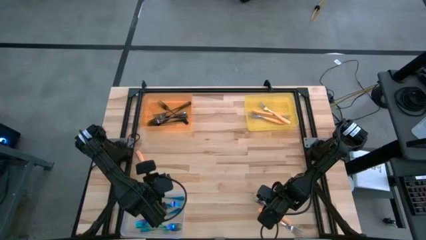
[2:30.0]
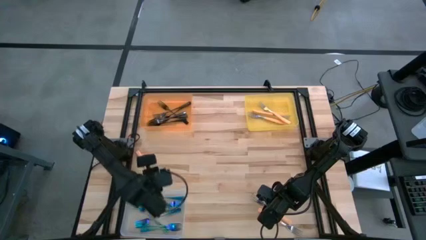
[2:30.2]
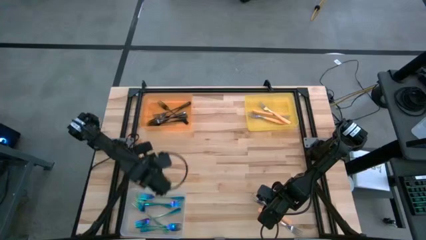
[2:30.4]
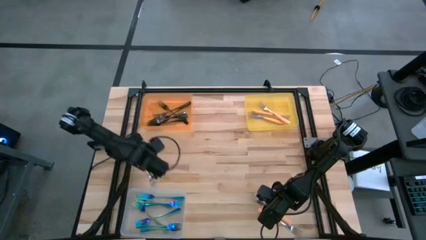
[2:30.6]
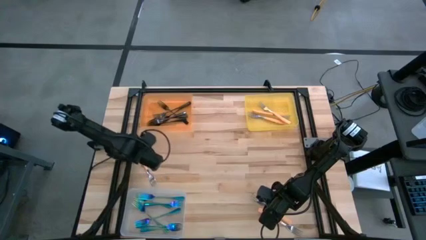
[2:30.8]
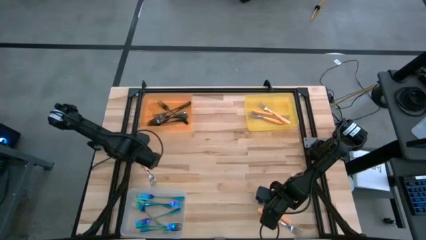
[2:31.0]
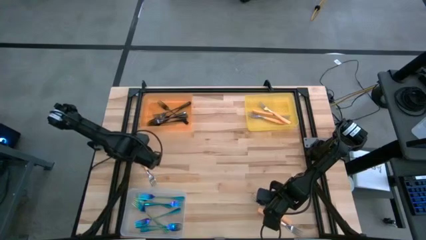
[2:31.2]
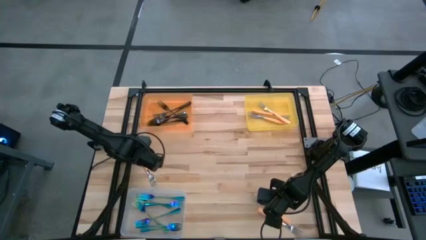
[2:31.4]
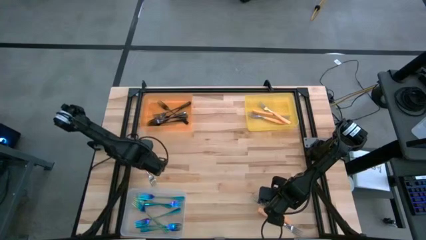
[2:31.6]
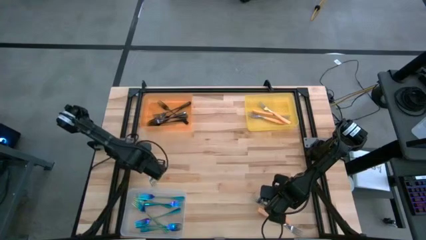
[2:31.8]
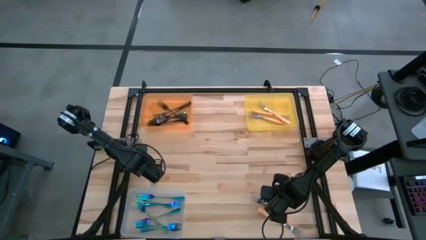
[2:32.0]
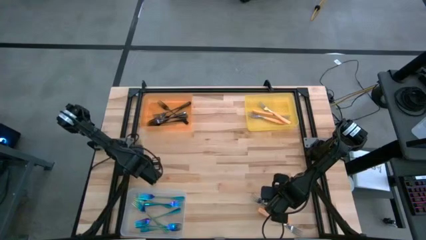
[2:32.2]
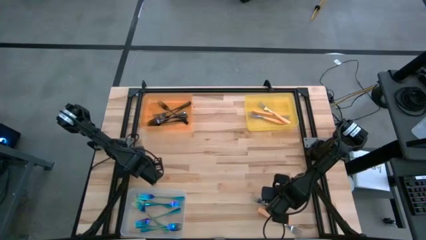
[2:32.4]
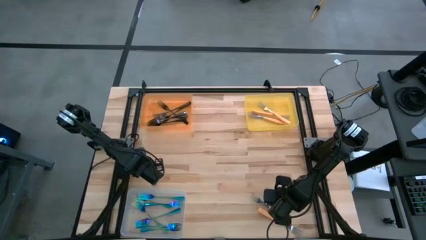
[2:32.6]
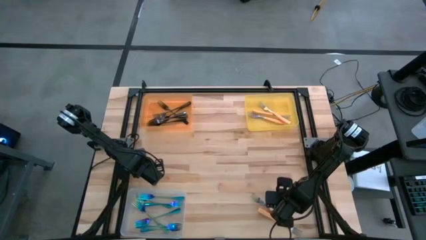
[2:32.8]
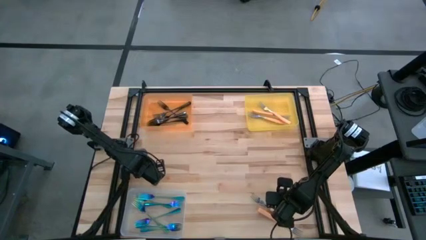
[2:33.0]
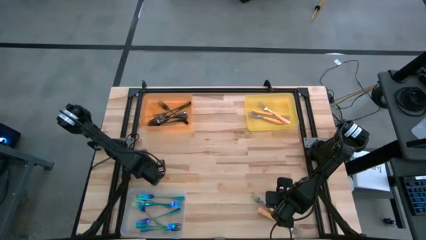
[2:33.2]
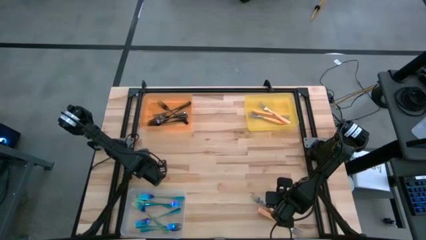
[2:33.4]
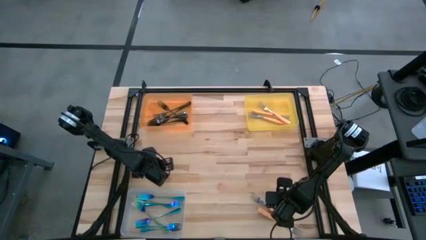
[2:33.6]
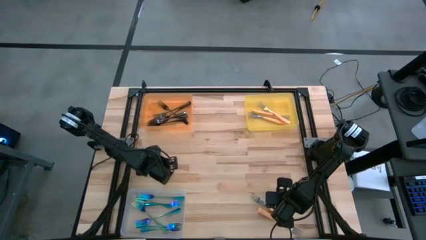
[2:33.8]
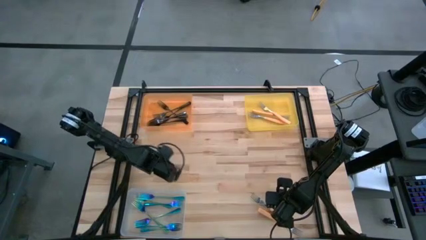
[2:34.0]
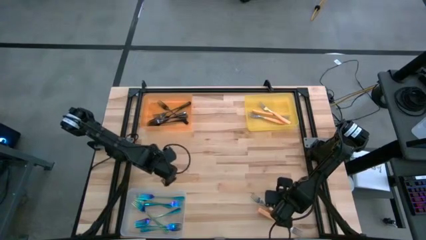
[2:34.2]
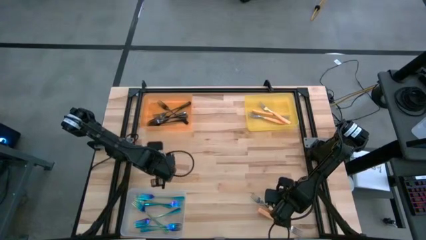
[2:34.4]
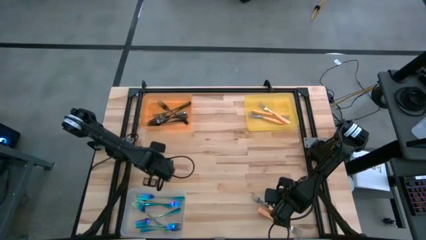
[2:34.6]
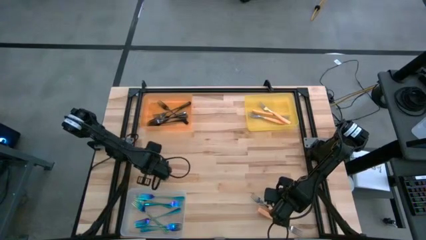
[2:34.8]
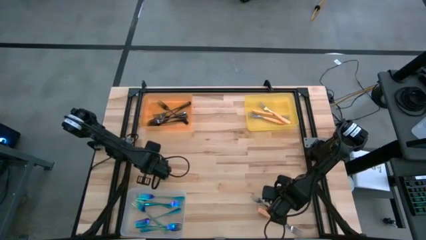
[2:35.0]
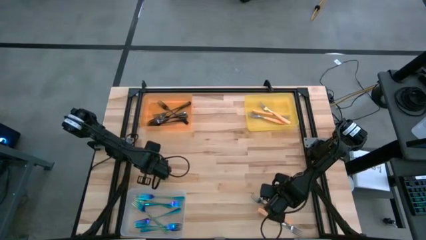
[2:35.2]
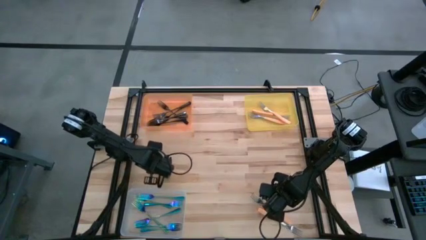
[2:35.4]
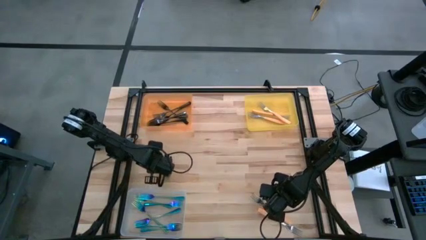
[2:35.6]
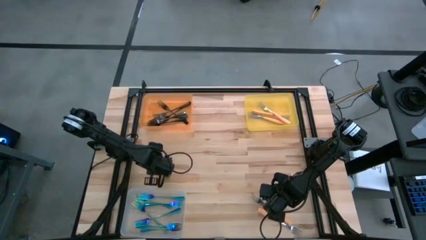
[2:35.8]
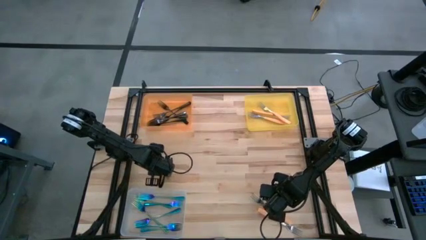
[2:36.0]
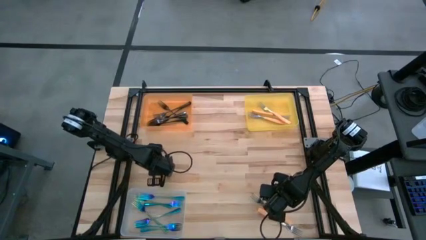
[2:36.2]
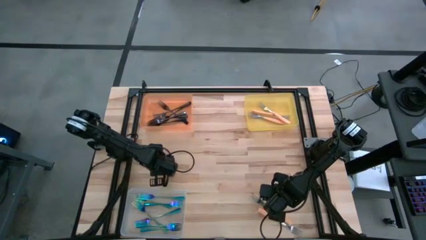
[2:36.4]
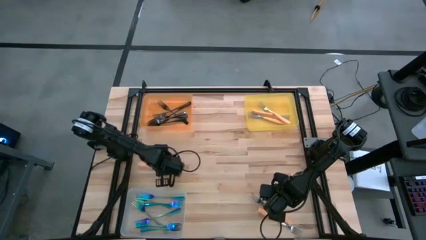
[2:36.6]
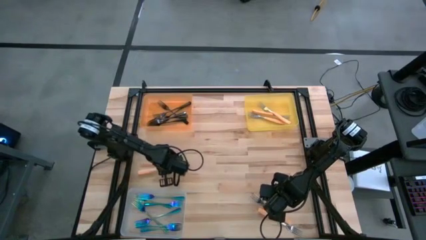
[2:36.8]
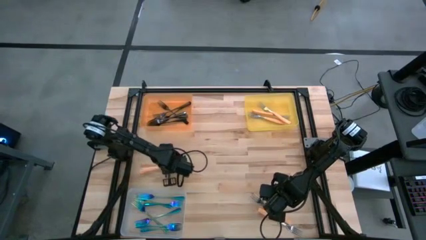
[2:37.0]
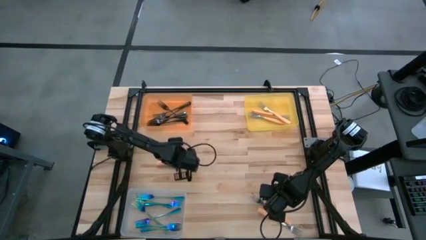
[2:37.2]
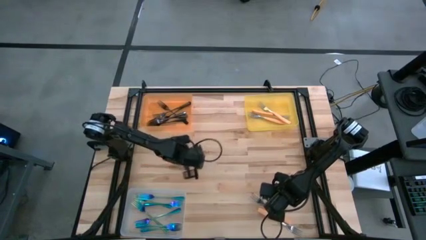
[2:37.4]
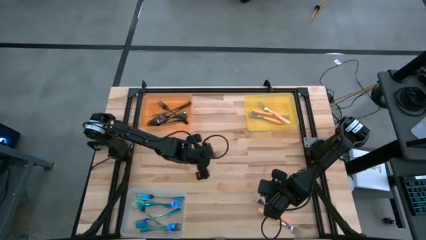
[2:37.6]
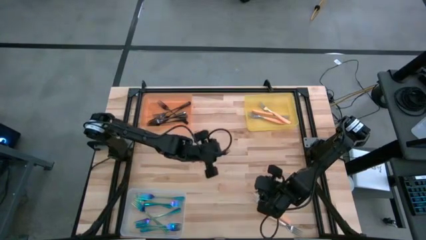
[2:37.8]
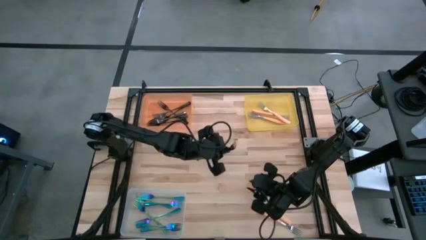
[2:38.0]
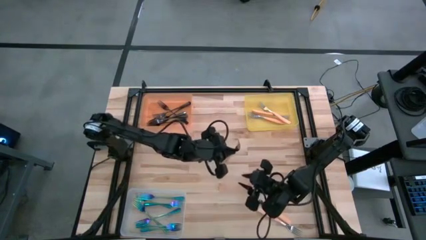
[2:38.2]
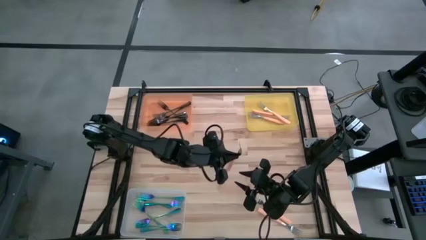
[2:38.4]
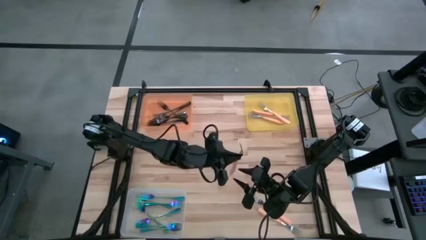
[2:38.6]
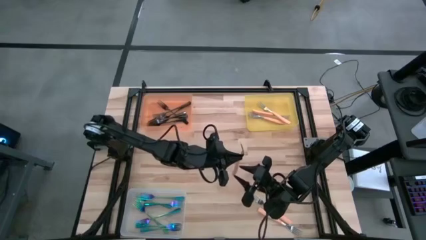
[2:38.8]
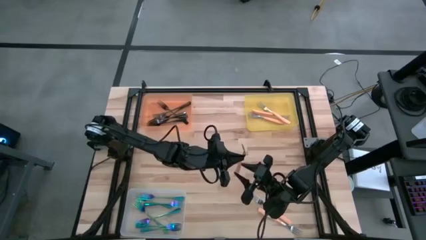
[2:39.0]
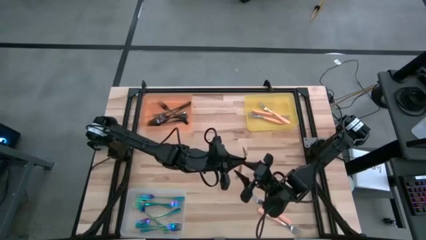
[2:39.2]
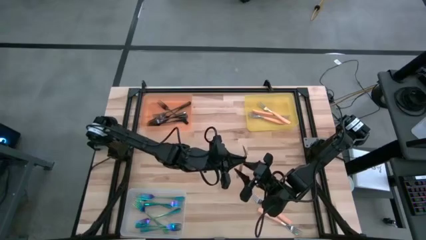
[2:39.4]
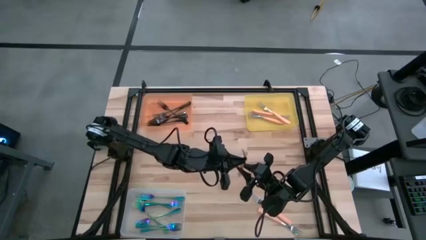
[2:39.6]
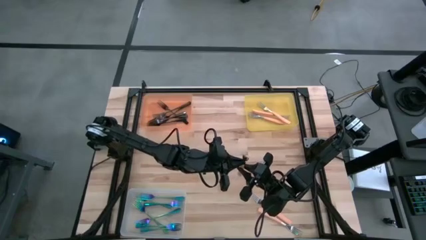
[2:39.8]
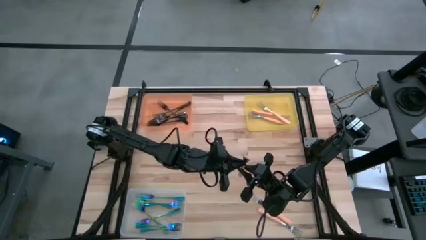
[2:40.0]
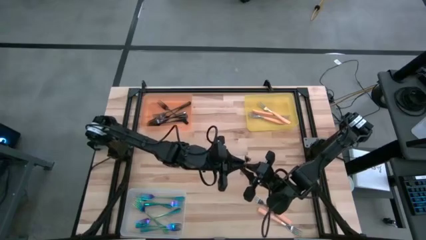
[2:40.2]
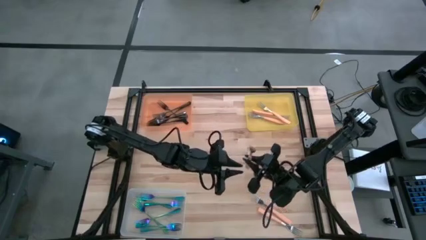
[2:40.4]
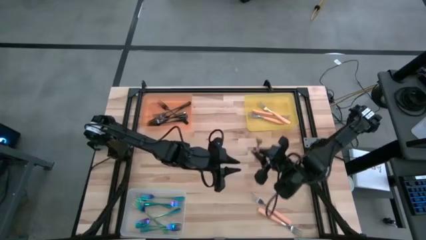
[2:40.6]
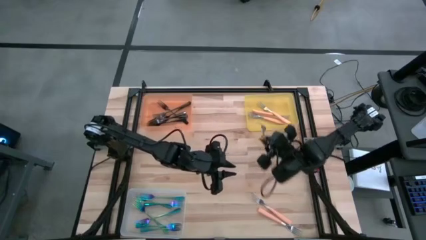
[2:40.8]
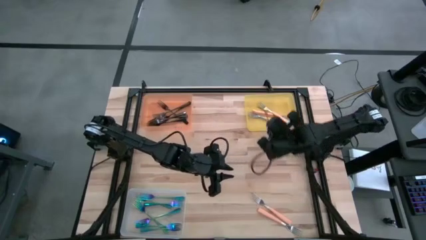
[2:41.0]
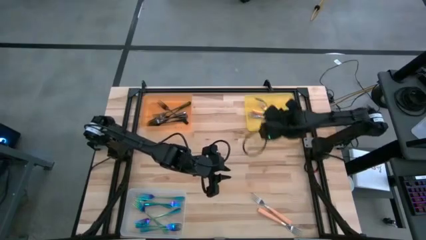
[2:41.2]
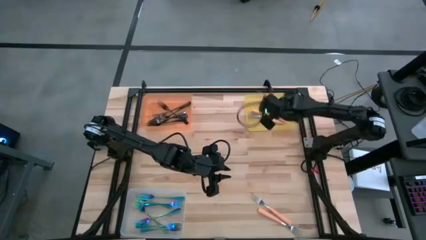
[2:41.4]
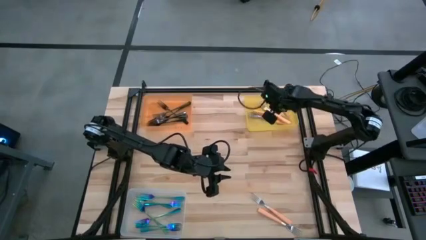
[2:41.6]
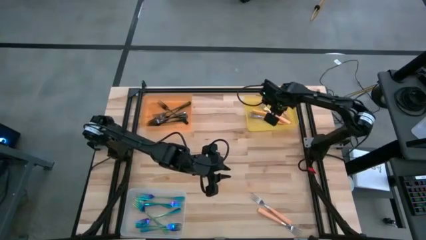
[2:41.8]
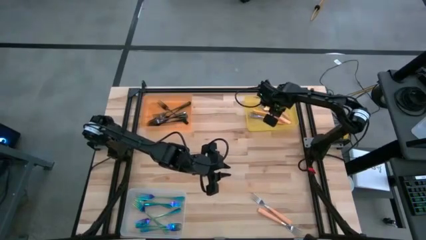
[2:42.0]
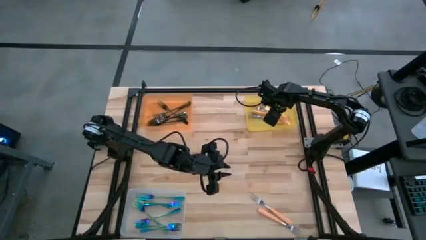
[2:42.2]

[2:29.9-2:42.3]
Task: Sort silverware by color (type)
Put the orange fork into the yellow bin

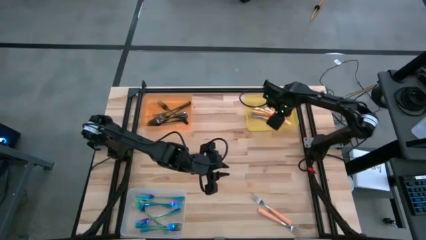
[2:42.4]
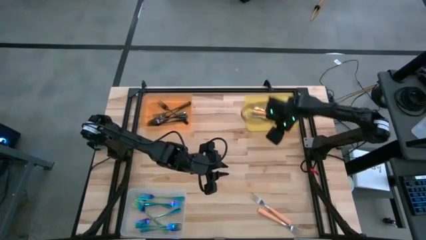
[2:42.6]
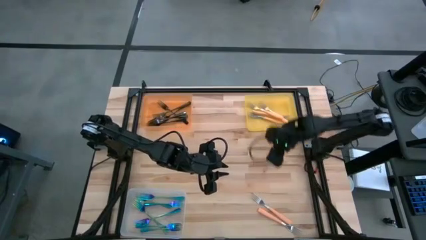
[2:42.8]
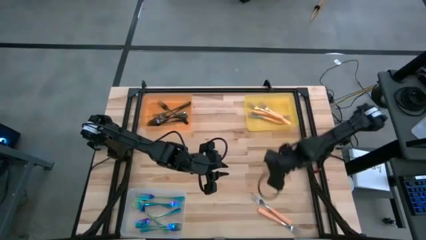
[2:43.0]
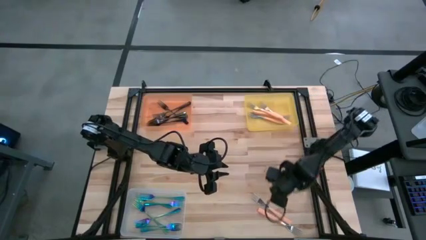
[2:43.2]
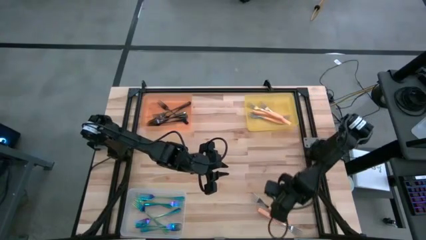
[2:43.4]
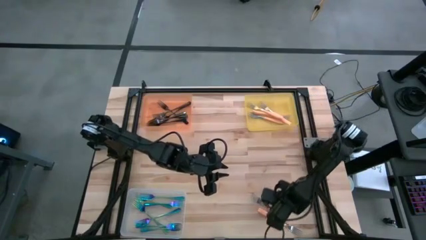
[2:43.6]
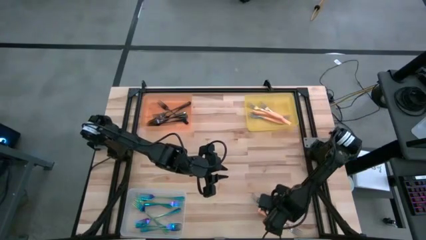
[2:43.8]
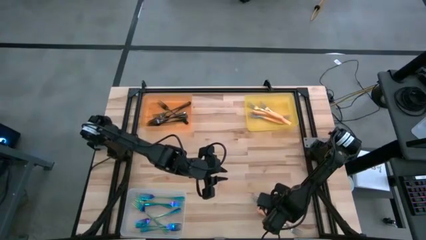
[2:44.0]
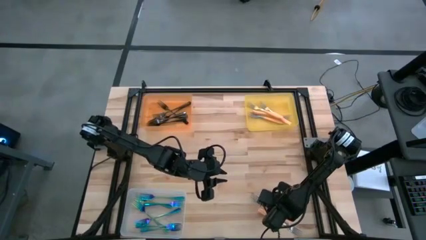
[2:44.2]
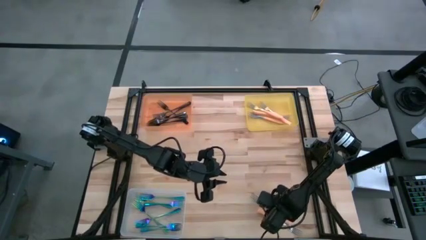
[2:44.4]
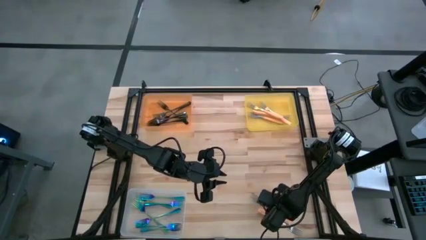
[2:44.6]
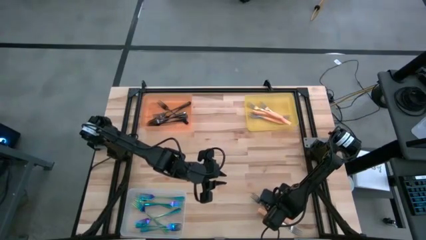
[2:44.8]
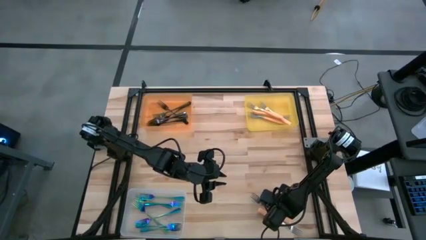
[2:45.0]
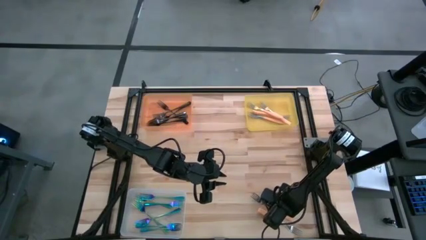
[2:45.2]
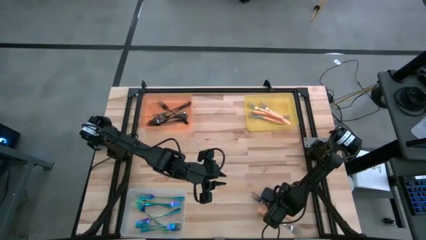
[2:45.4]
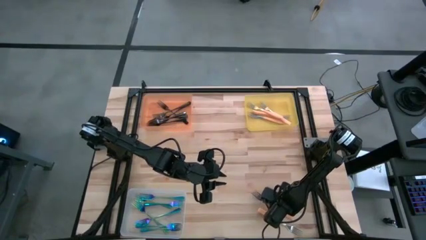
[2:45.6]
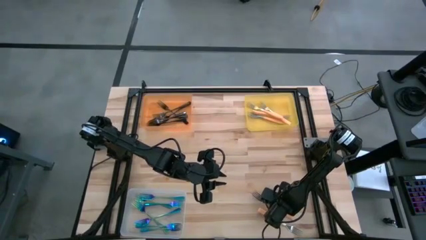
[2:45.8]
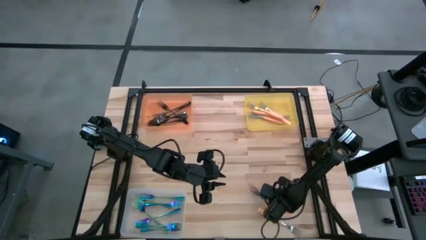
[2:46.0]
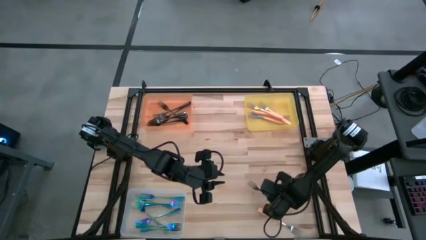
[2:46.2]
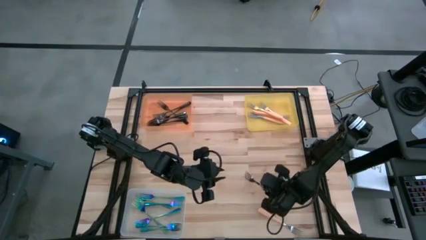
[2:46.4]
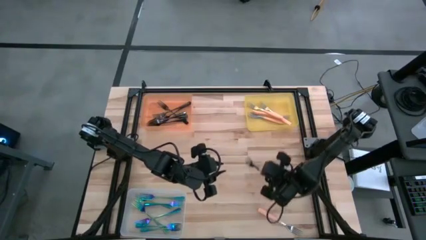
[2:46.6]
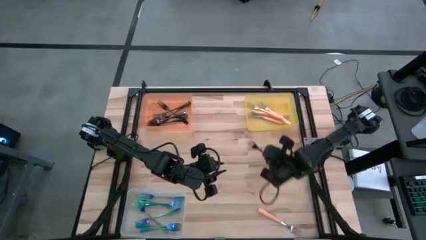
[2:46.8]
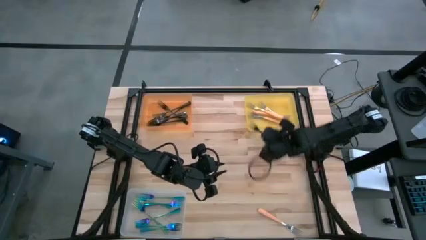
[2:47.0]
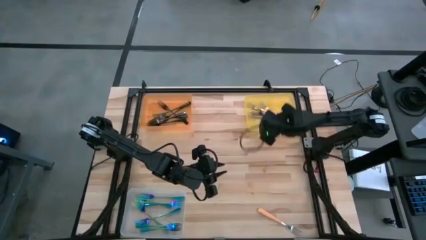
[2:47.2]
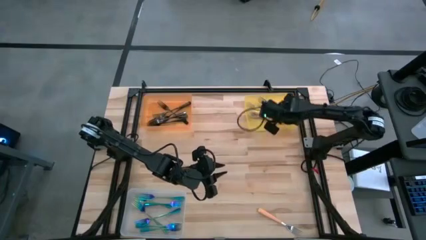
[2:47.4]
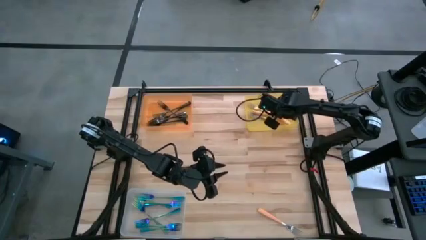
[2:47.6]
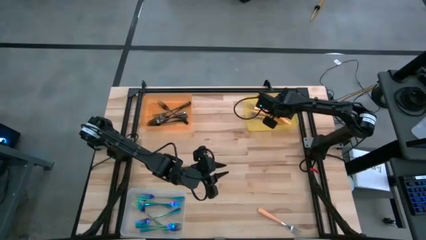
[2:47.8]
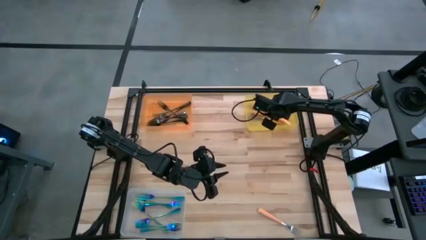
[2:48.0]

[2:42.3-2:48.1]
Put the orange fork into the yellow bin
